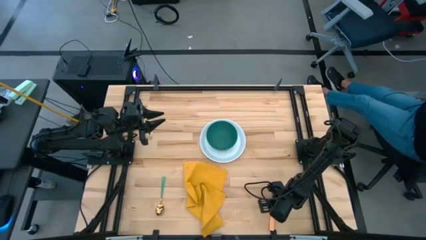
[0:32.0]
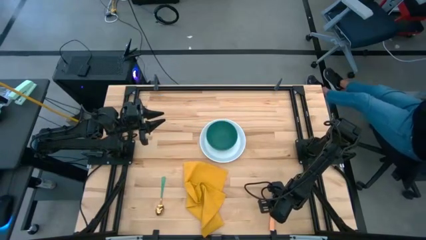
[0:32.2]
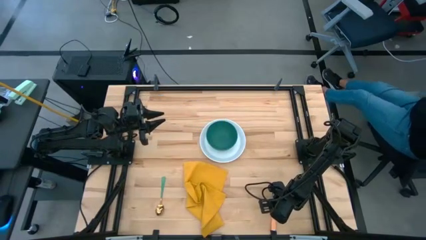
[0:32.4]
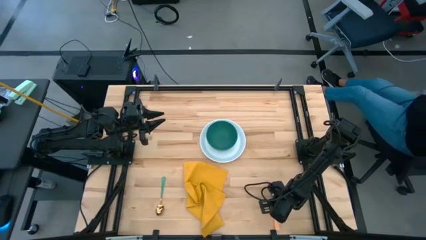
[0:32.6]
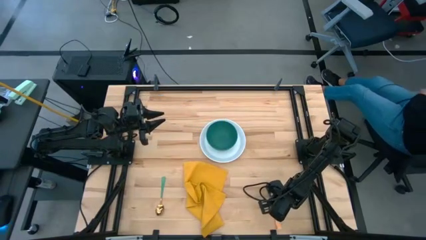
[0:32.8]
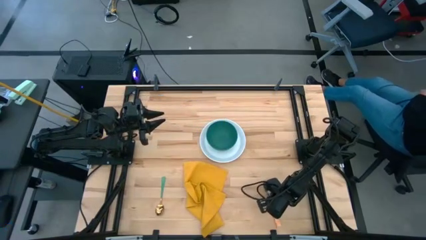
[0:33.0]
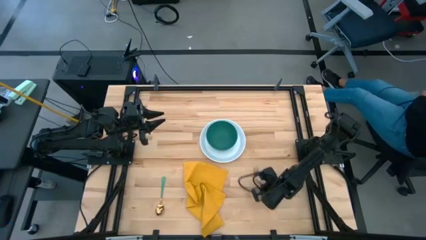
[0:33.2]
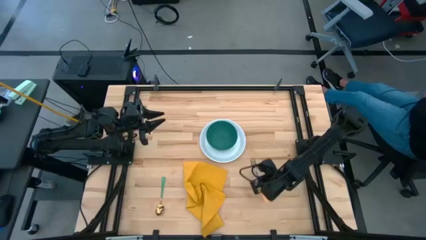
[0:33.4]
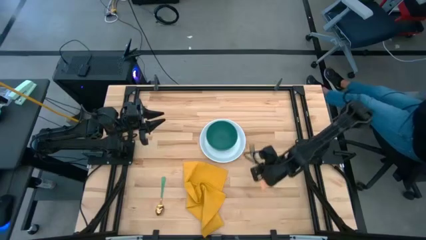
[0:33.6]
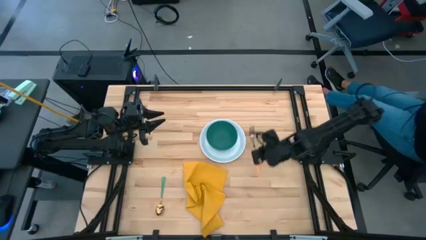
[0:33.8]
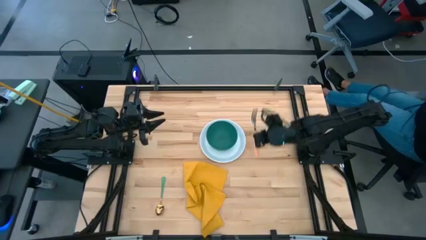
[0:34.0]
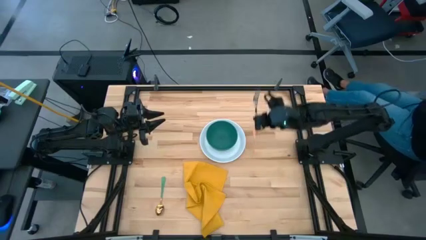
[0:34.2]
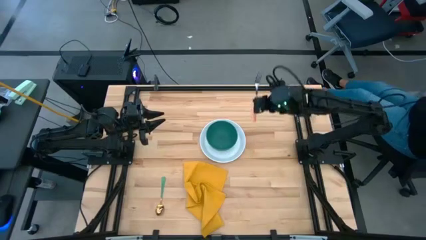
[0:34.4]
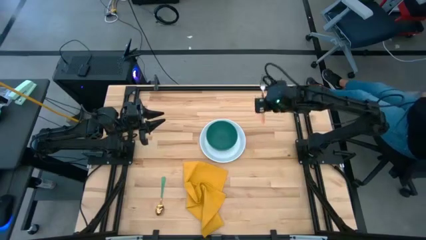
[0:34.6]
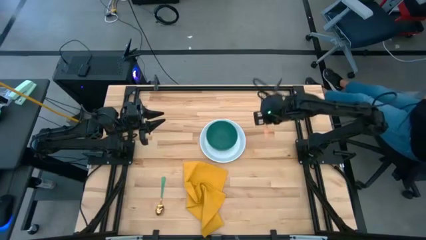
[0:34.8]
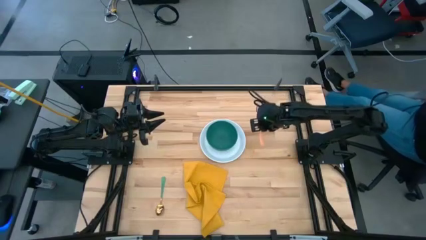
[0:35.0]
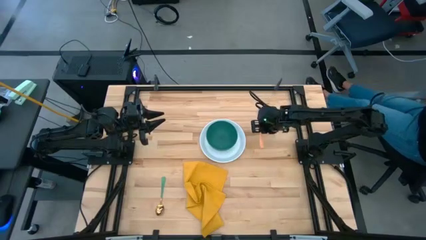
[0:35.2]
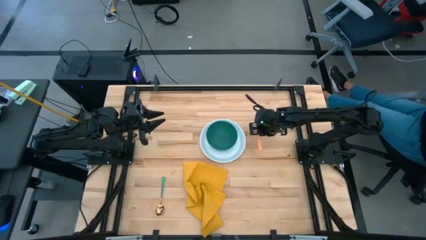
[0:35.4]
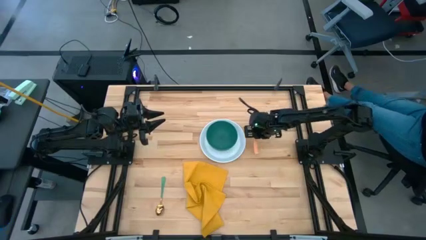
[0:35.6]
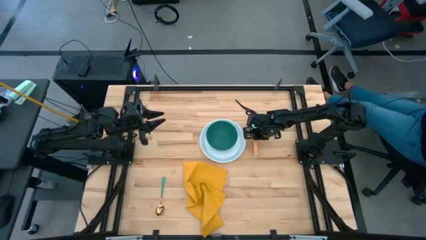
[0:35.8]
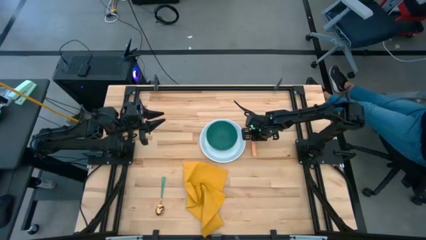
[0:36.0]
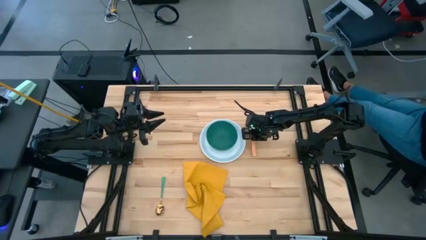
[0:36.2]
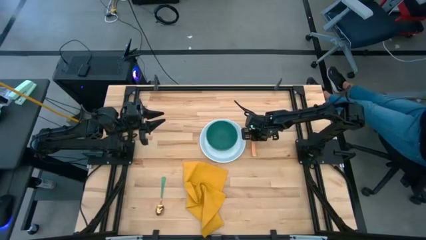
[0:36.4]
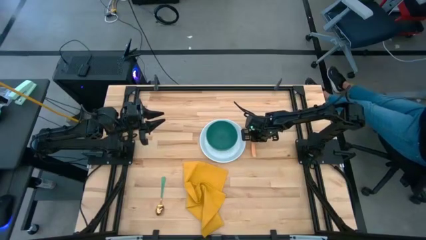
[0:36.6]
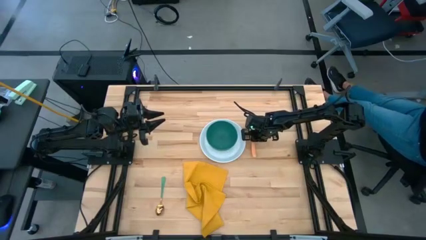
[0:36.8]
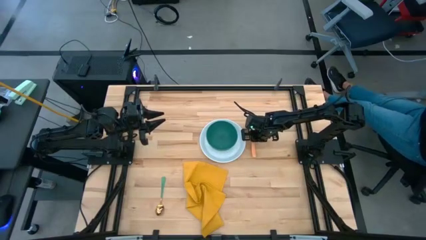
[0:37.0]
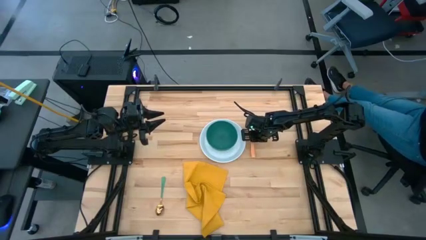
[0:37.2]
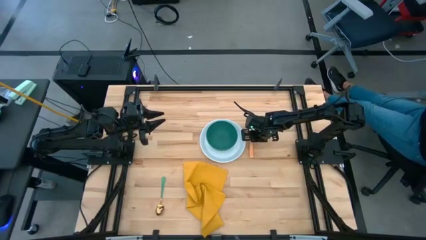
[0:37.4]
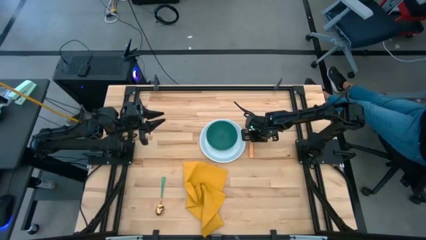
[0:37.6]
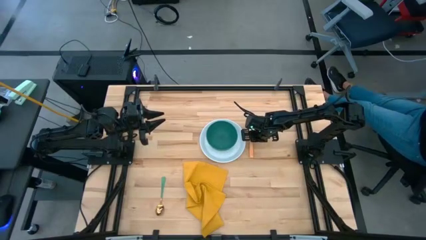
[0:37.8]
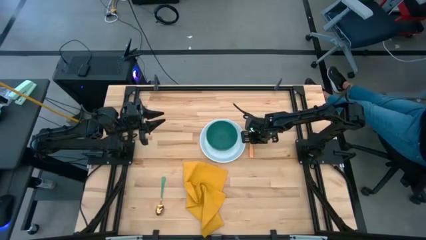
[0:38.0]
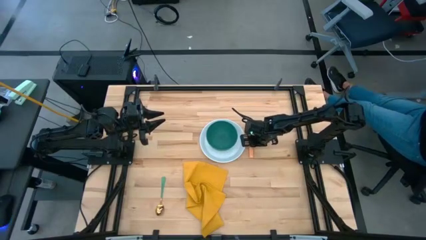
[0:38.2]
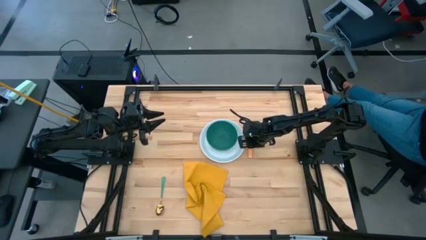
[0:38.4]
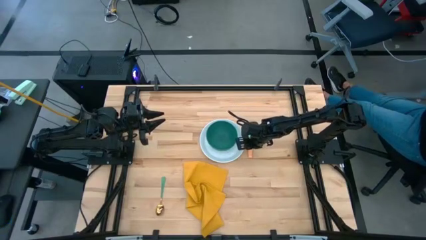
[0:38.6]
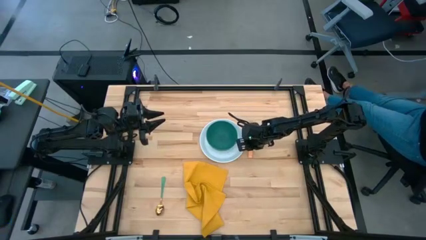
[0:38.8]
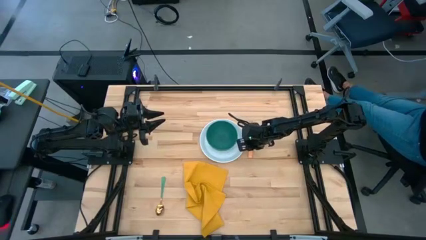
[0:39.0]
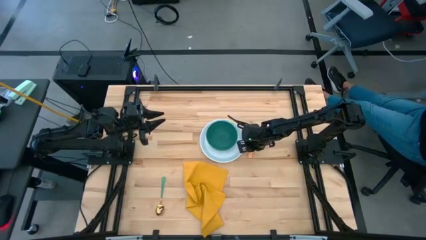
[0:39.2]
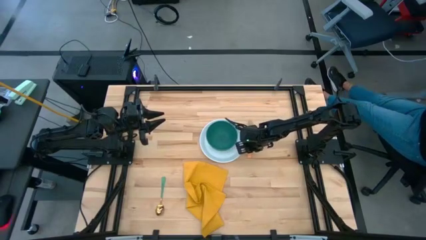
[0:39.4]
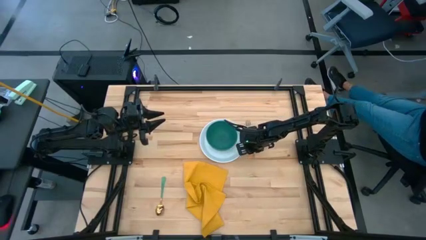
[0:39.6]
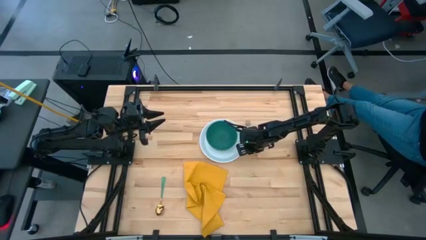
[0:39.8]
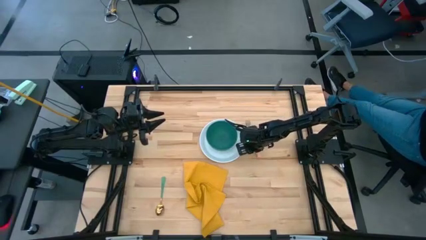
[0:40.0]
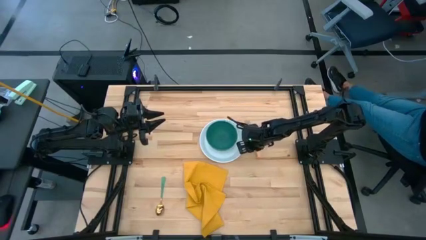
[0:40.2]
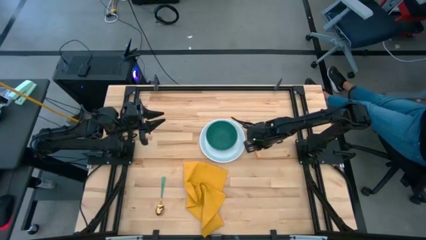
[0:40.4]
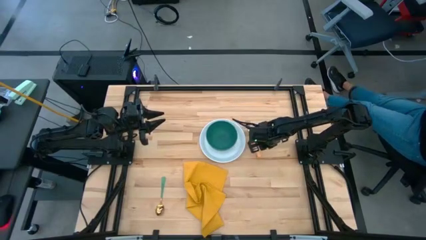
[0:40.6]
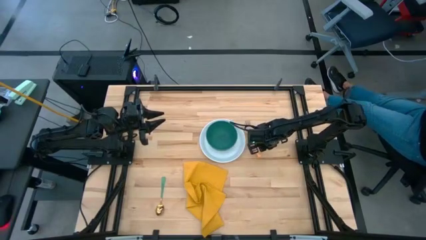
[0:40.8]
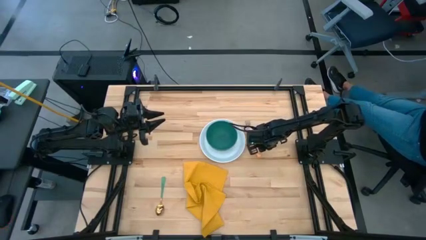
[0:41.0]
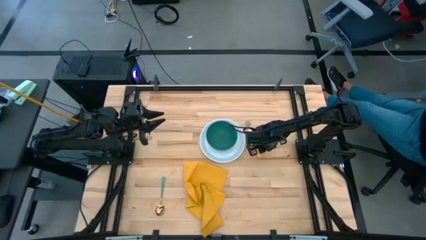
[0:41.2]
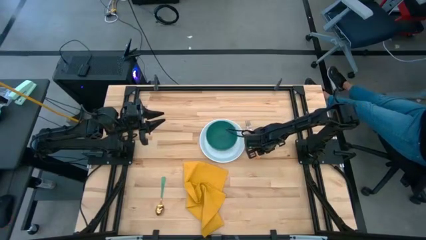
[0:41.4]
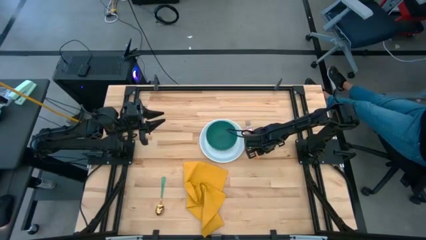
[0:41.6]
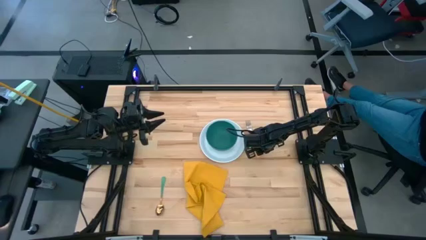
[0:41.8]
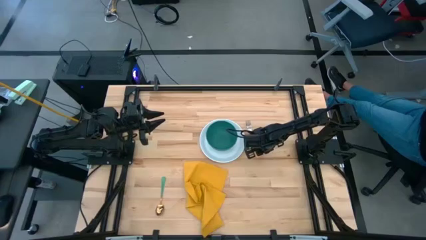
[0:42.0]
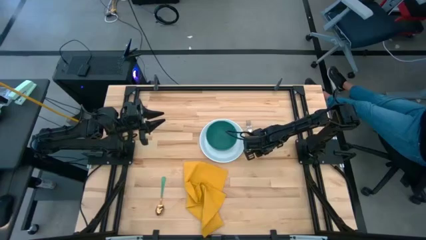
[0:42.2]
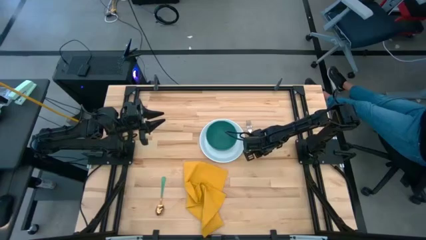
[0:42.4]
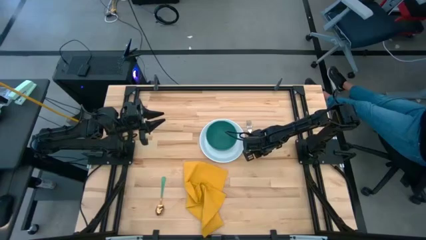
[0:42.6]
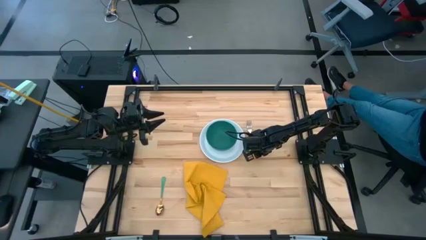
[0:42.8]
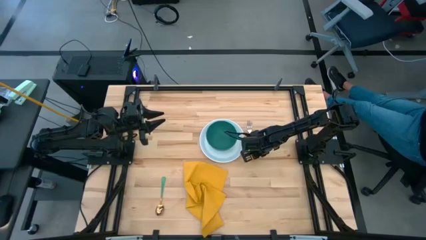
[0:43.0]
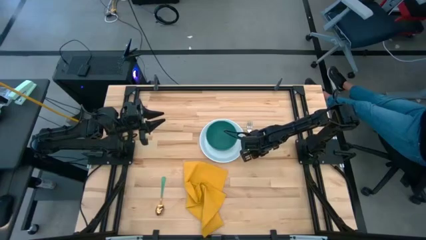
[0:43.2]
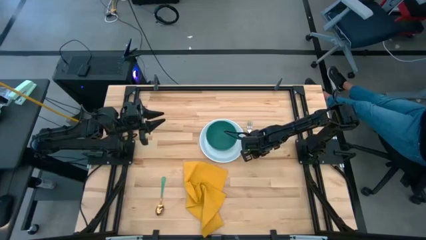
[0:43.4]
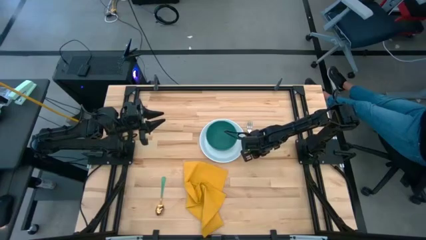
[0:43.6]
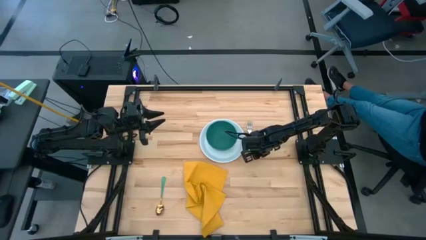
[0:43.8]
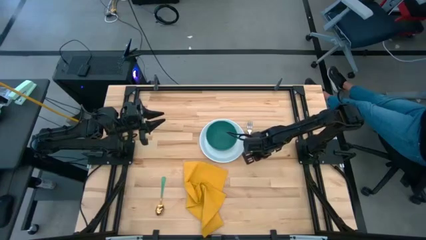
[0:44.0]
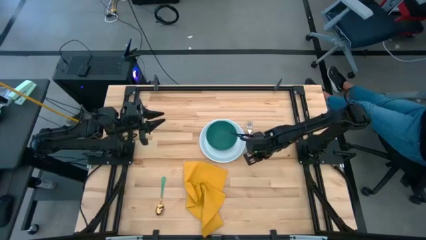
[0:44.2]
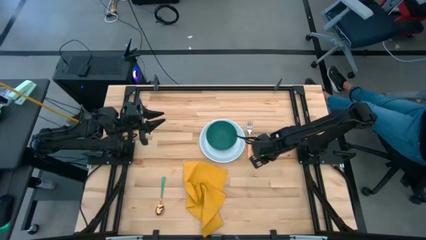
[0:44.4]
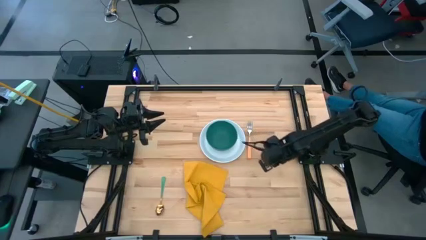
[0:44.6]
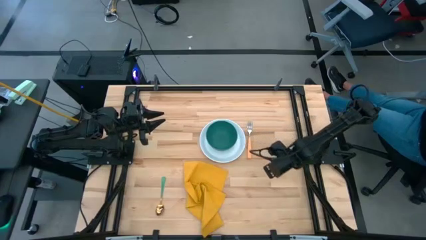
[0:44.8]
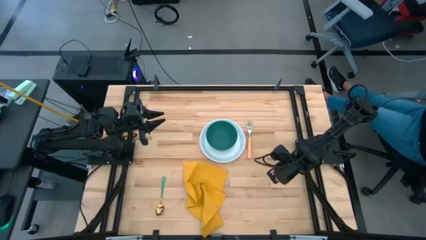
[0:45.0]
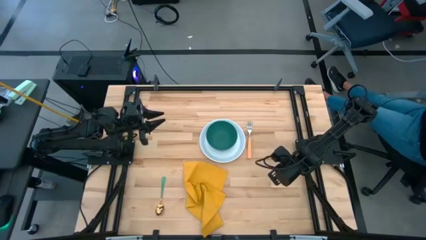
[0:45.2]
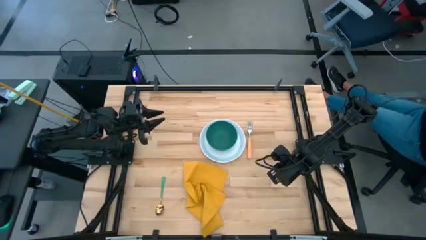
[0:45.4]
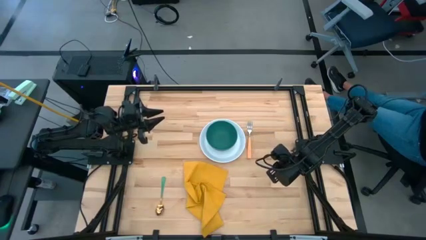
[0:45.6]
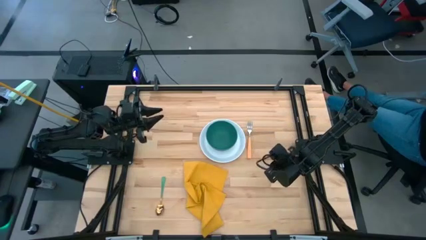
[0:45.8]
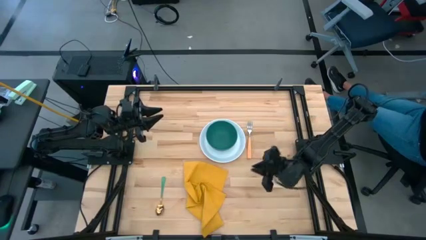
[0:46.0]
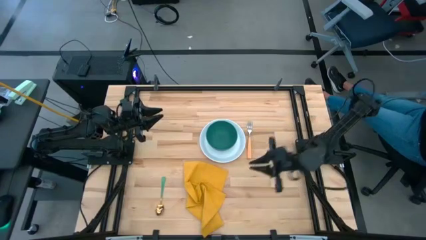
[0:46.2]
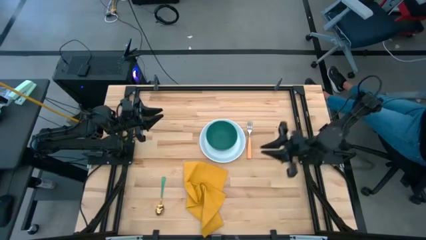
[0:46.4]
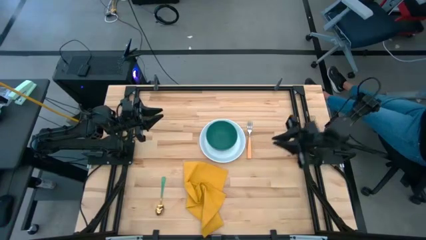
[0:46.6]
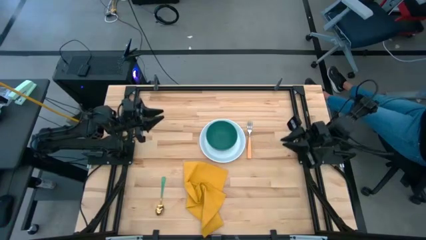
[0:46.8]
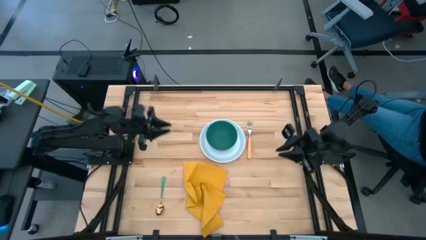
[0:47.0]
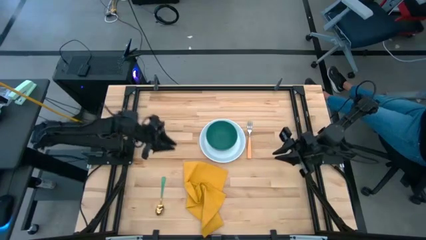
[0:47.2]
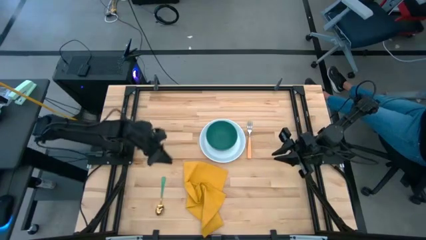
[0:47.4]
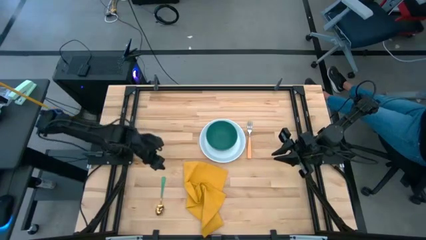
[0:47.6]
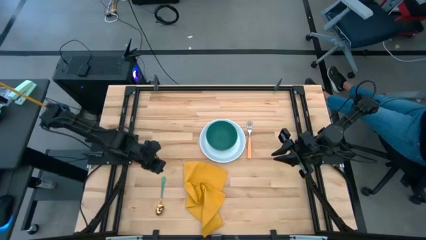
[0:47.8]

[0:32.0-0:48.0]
Task: Set table place
Place the silver fork to the right of the white plate
